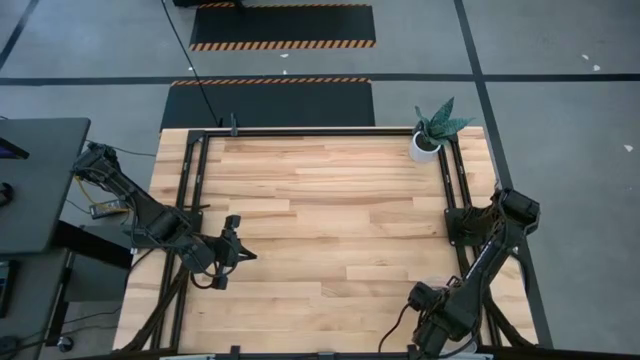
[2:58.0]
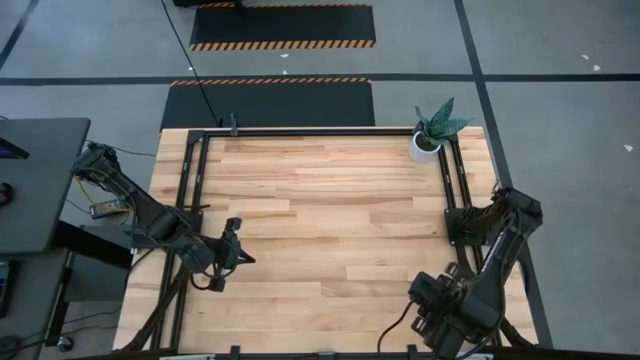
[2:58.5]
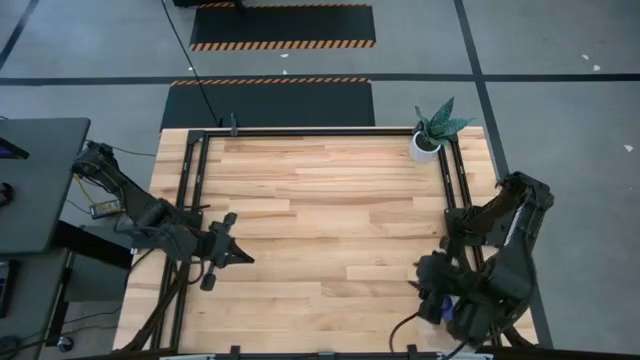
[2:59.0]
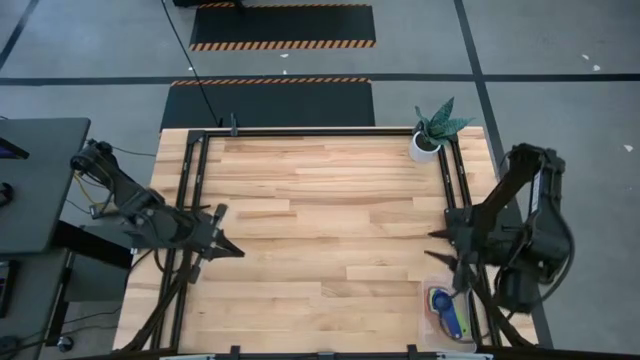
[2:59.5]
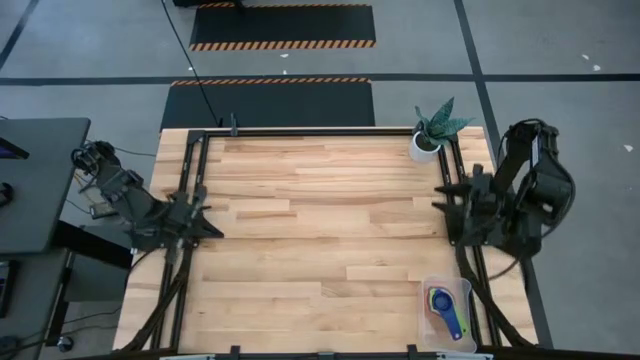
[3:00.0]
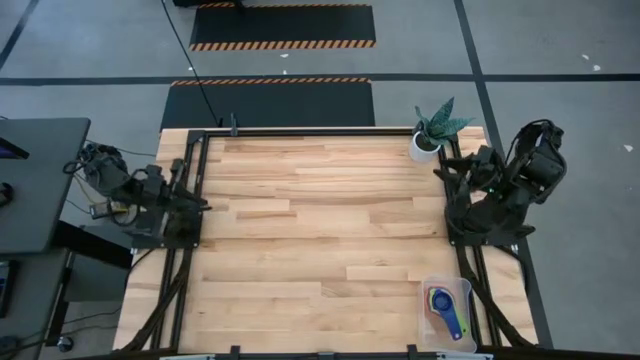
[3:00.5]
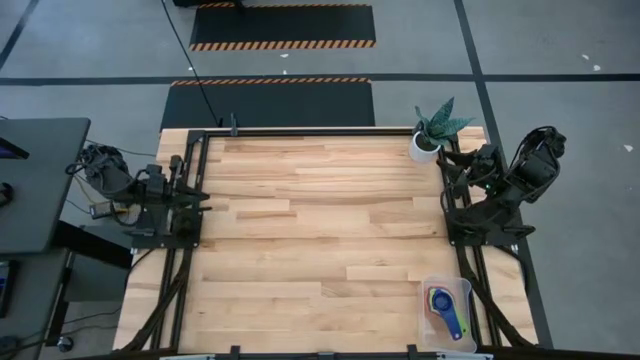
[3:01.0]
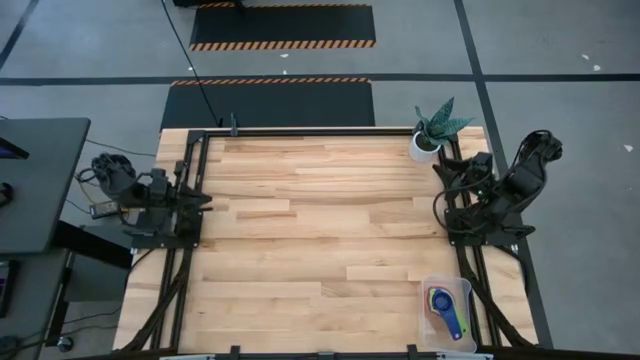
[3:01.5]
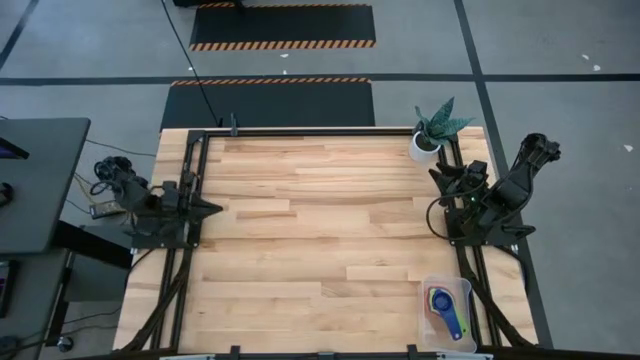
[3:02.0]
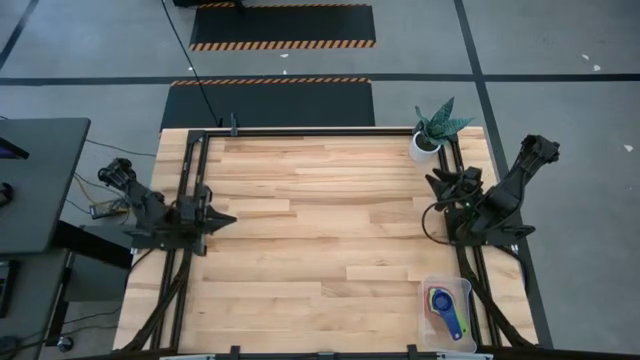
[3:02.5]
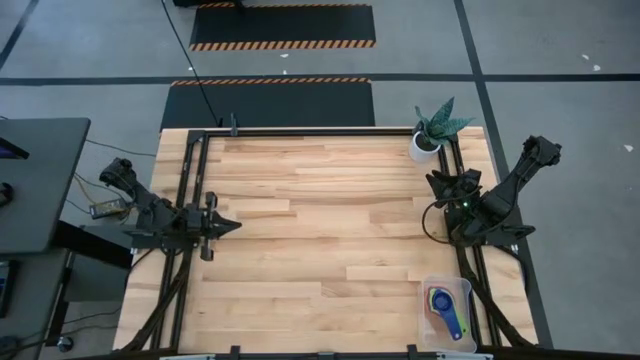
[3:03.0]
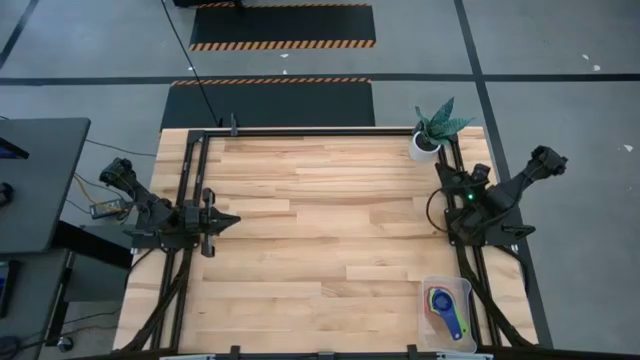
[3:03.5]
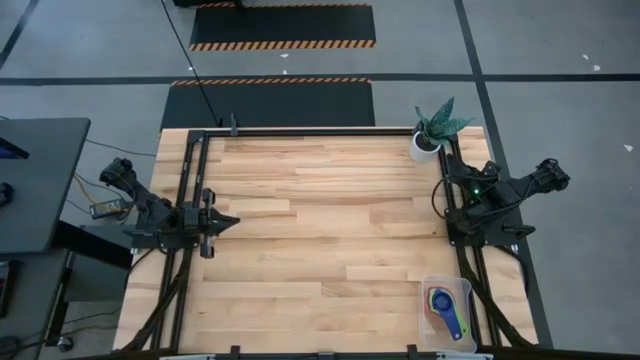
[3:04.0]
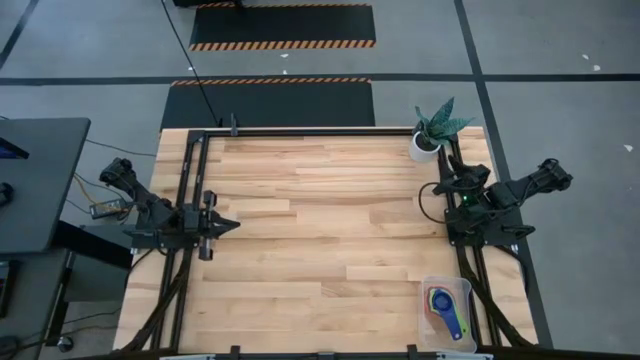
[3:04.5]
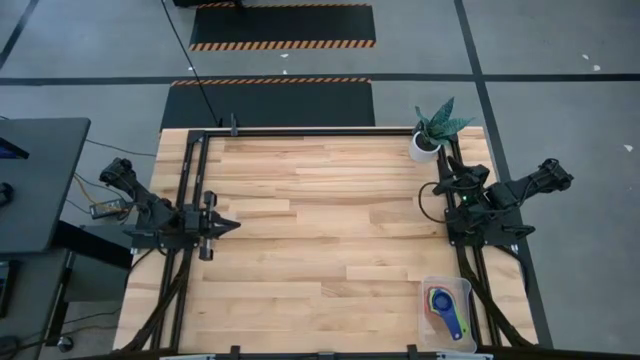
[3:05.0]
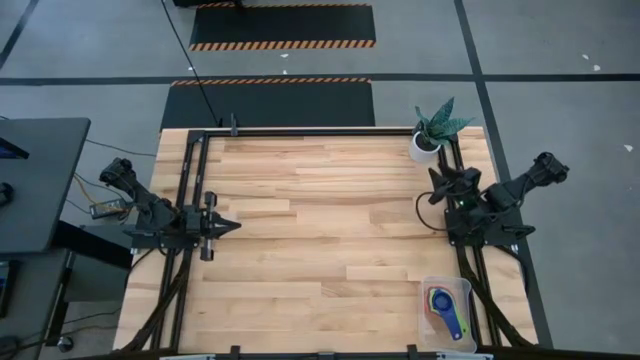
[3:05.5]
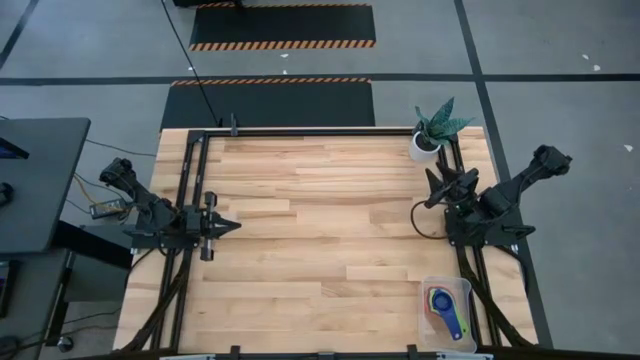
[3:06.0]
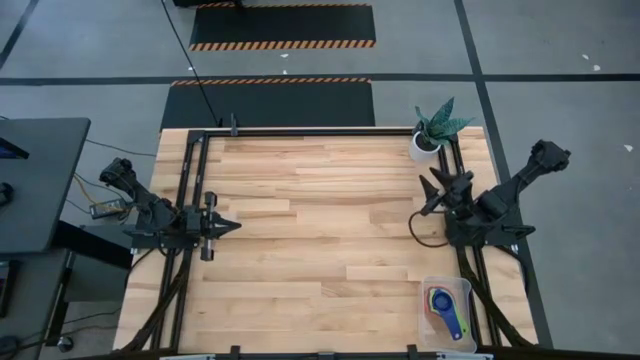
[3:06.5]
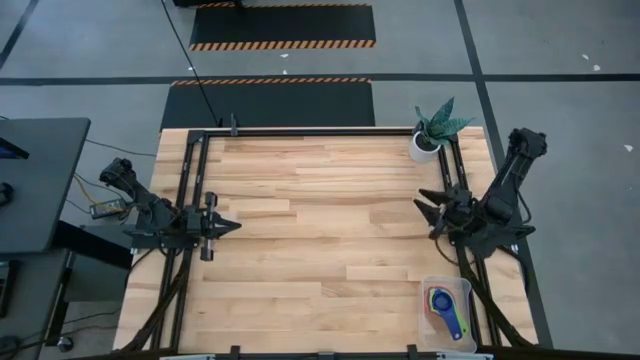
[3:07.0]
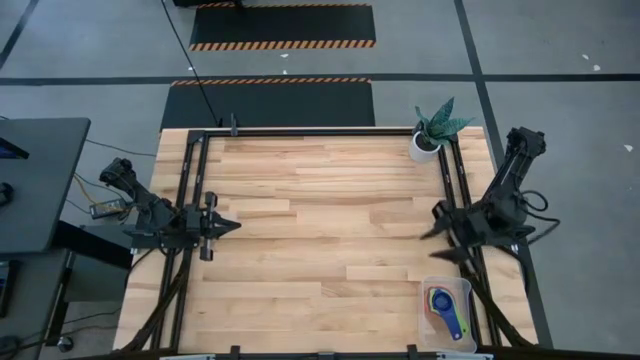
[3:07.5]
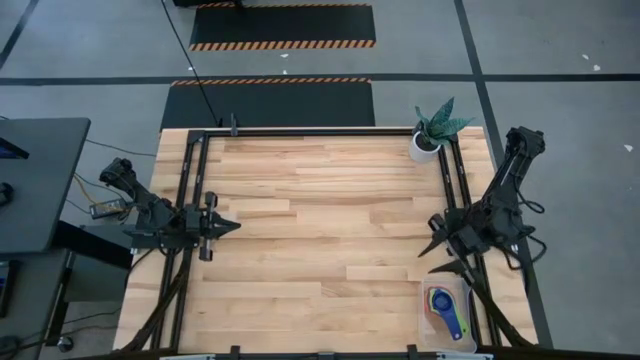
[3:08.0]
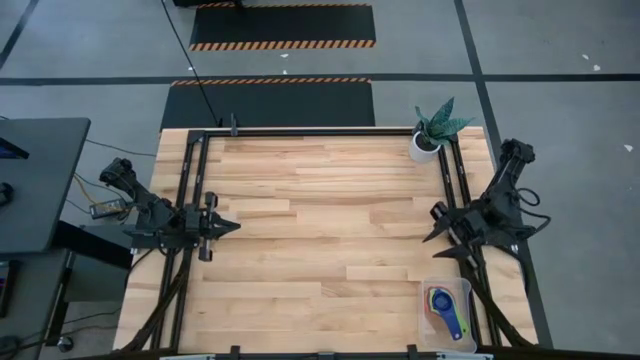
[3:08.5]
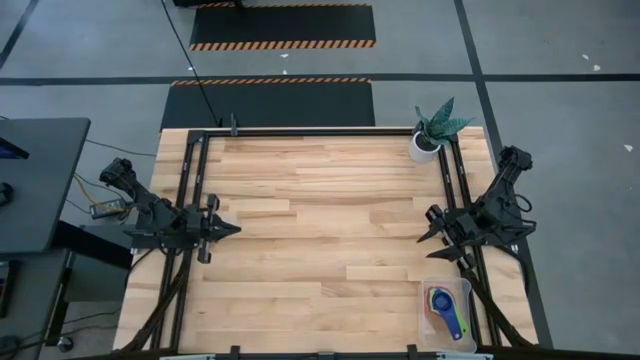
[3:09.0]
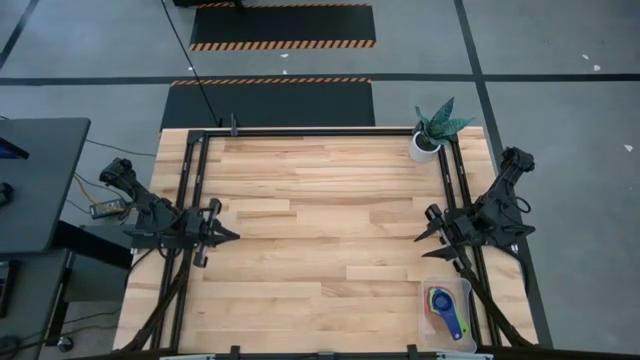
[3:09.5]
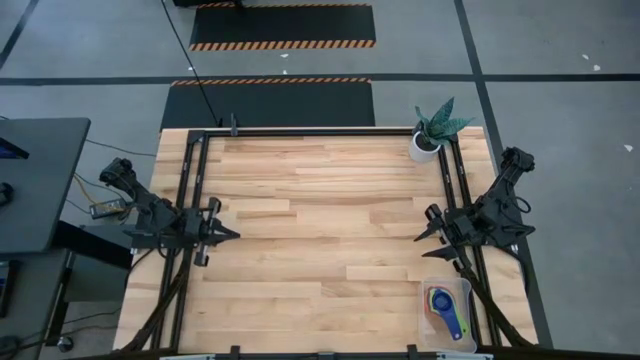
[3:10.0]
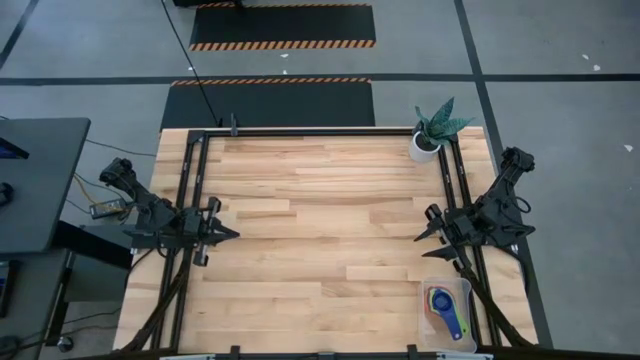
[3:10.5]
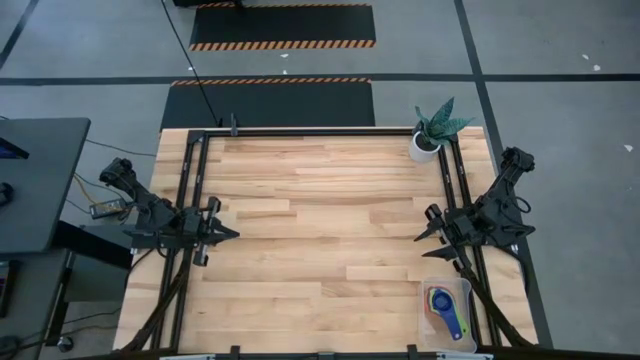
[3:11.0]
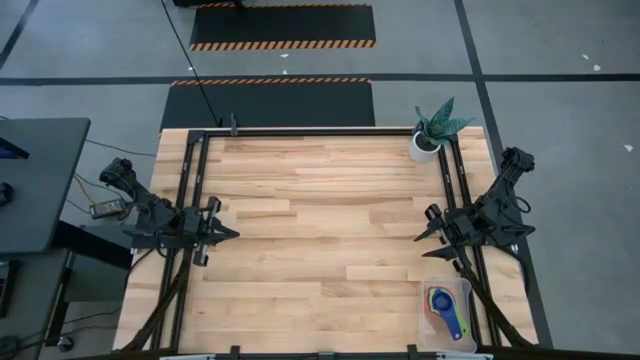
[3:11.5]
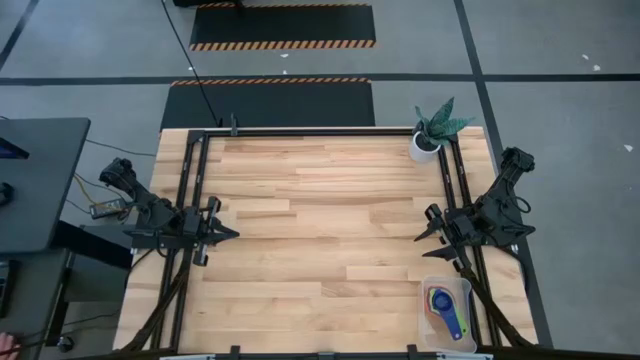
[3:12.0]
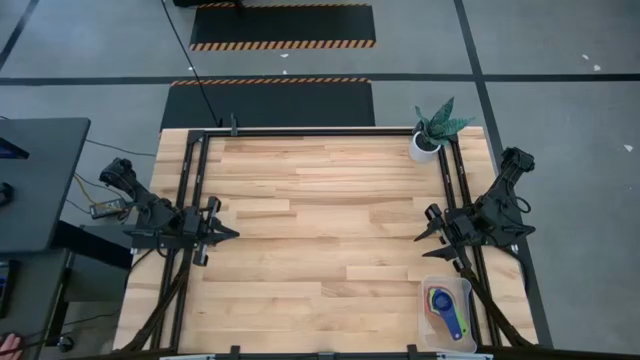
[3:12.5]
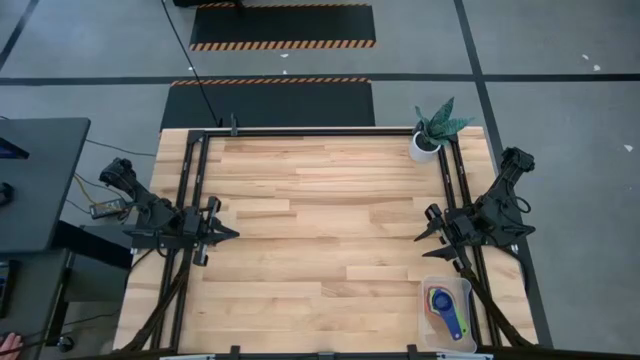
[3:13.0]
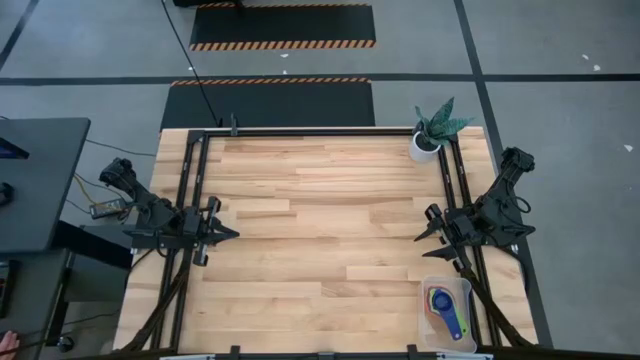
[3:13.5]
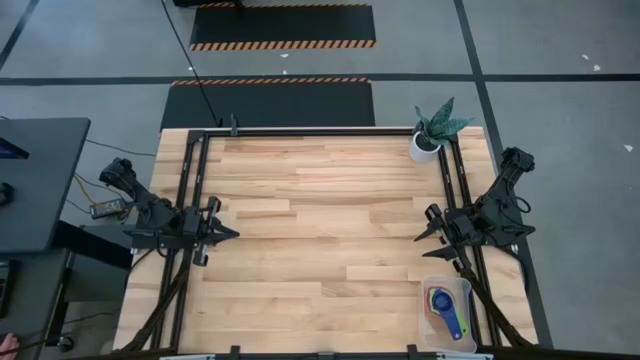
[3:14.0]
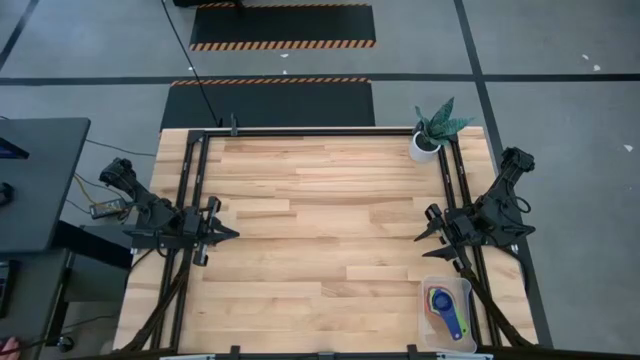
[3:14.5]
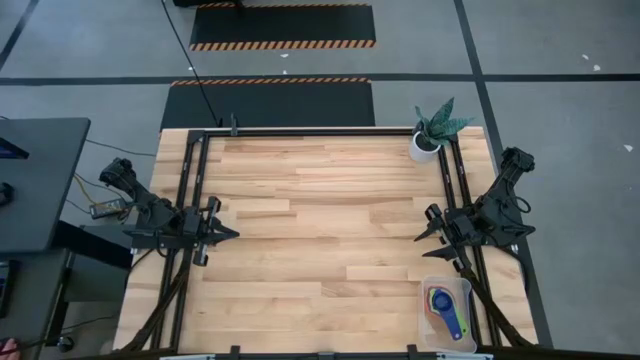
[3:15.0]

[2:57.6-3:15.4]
Task: Nest measuring cups in basket
Return to Home Position

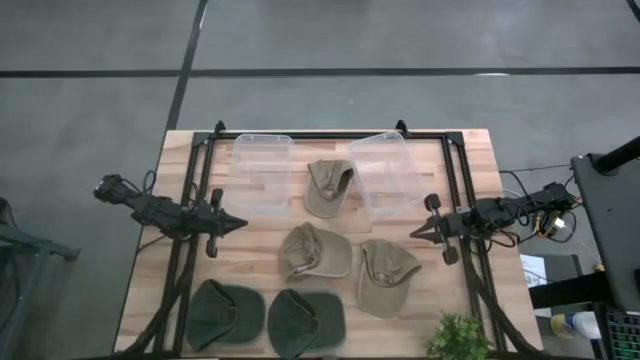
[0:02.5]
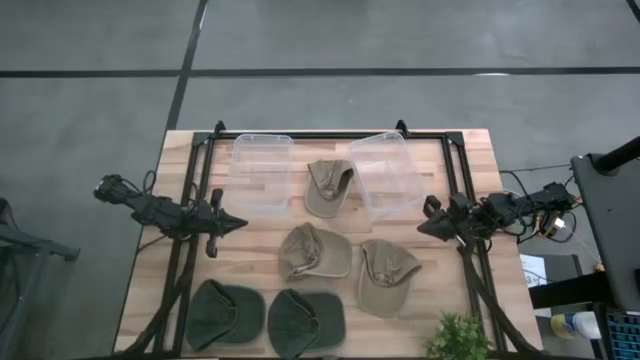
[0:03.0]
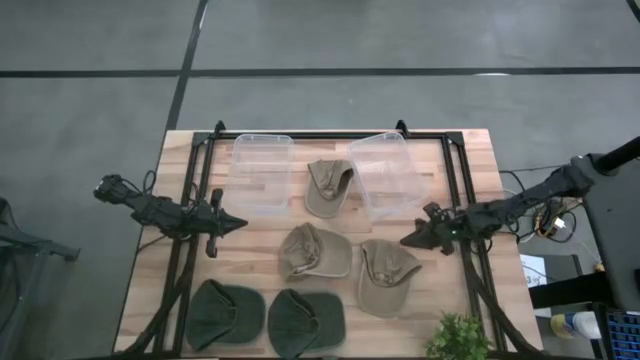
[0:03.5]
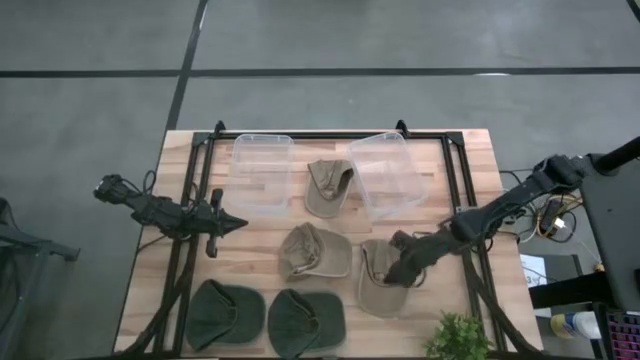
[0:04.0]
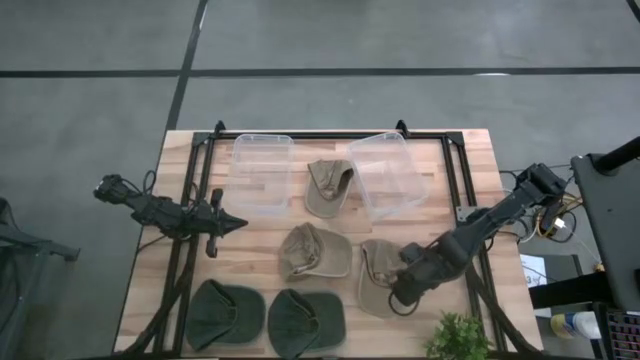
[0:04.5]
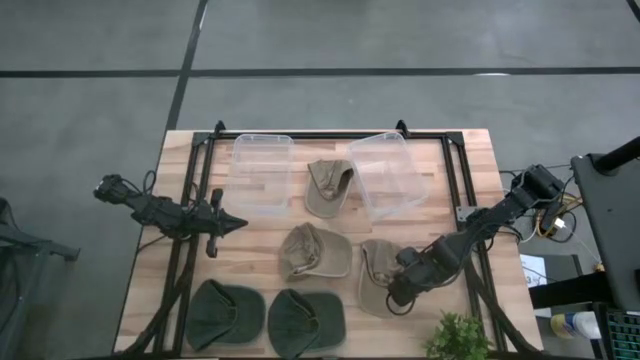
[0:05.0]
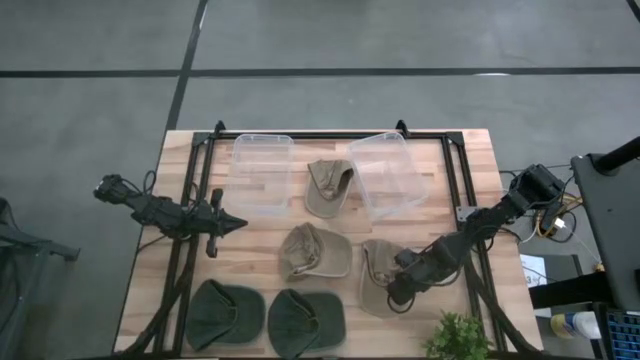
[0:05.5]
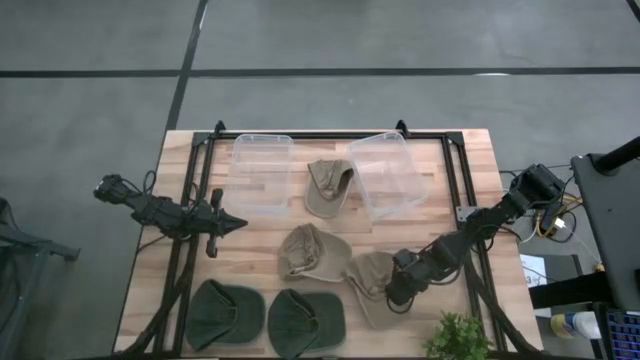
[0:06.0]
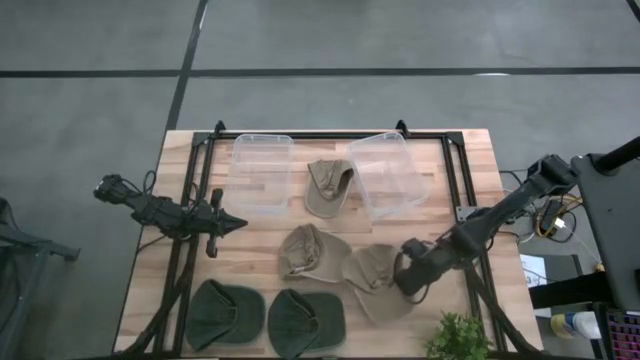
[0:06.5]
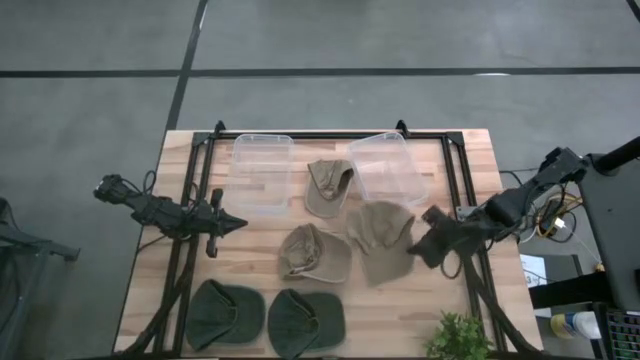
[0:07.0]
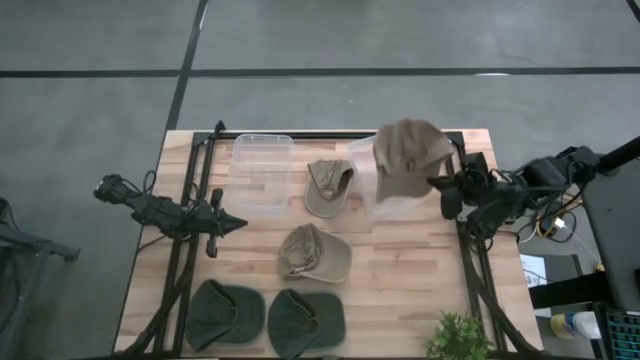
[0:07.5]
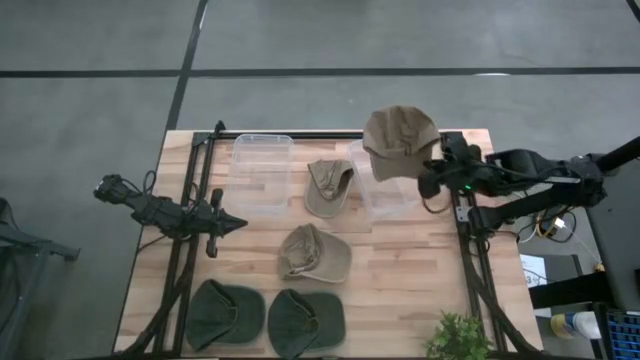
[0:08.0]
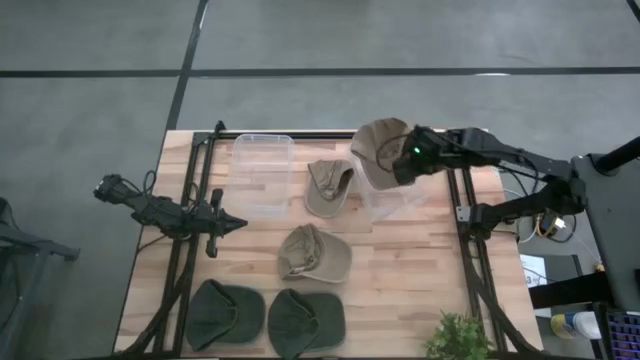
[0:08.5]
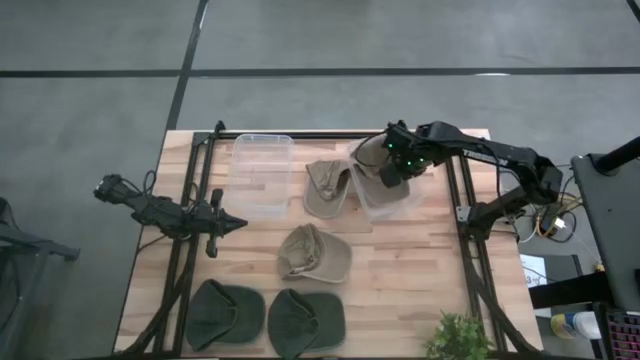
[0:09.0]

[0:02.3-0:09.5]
Task: Pick & Place hat
Put the bottom right brown cap into the right transparent bin
